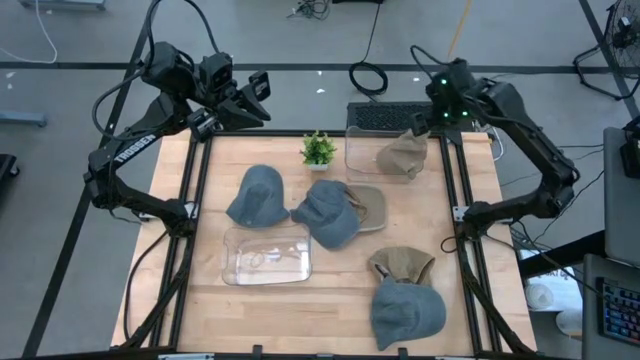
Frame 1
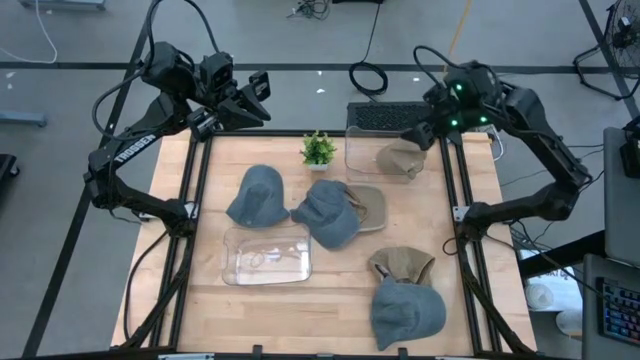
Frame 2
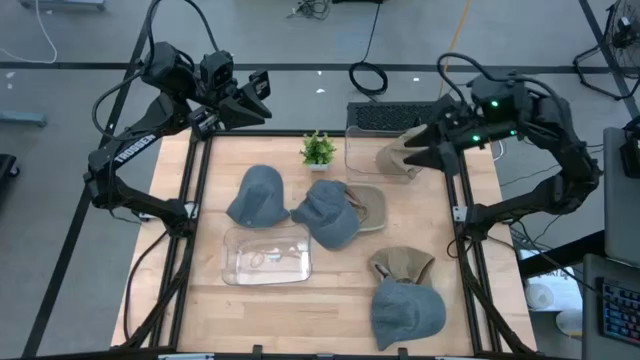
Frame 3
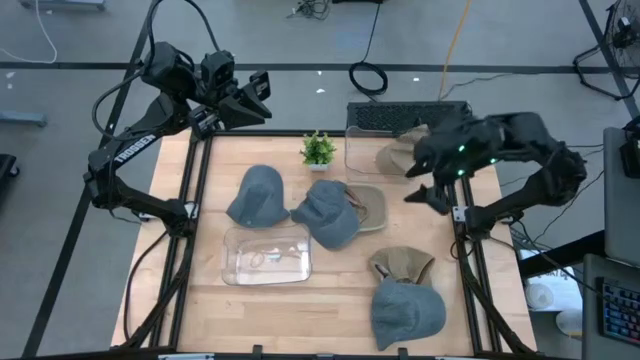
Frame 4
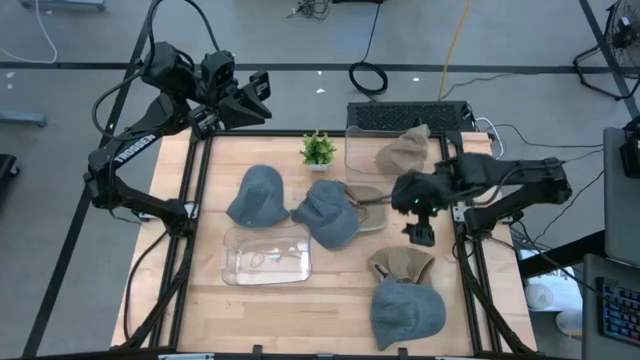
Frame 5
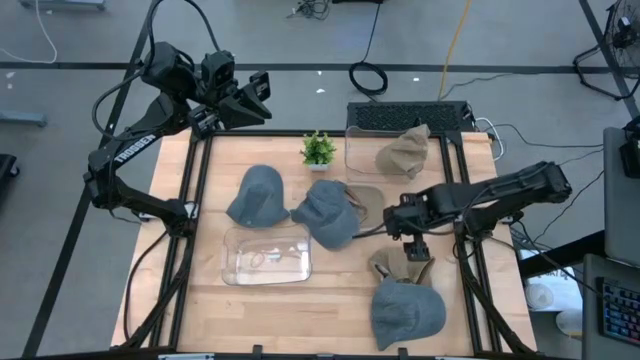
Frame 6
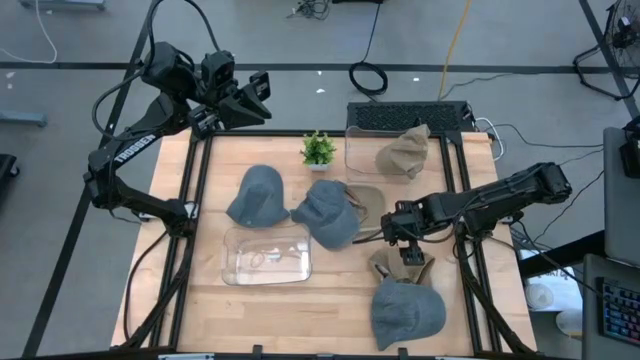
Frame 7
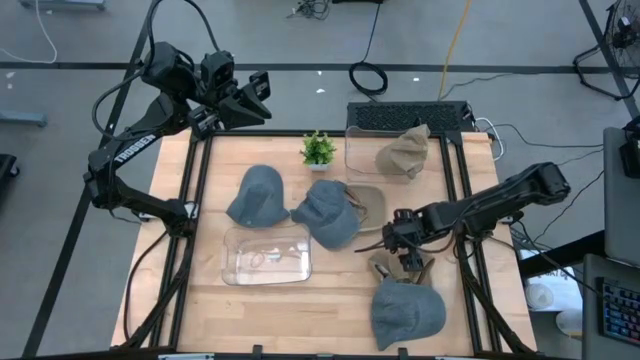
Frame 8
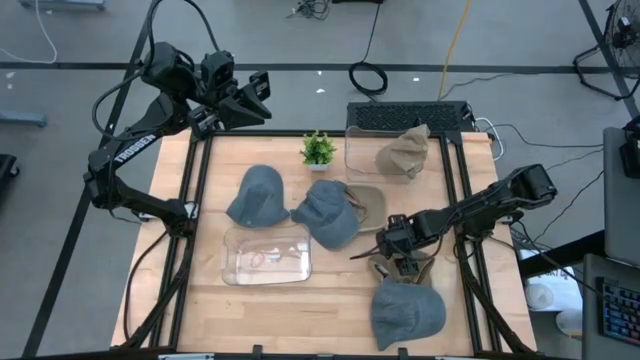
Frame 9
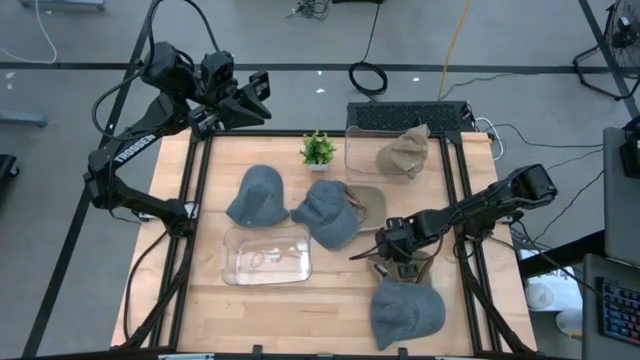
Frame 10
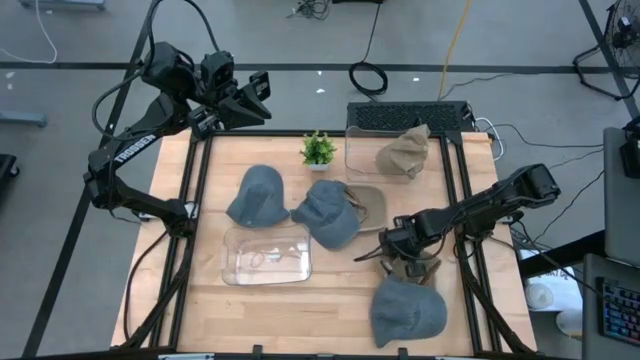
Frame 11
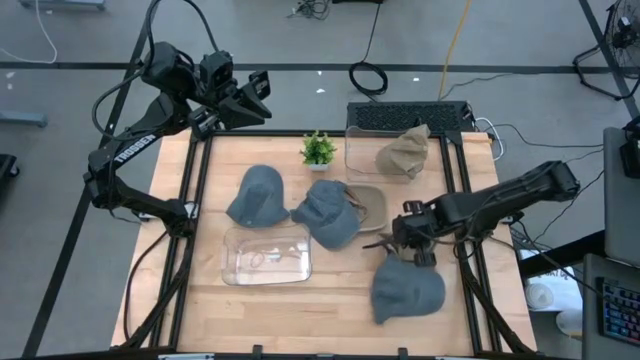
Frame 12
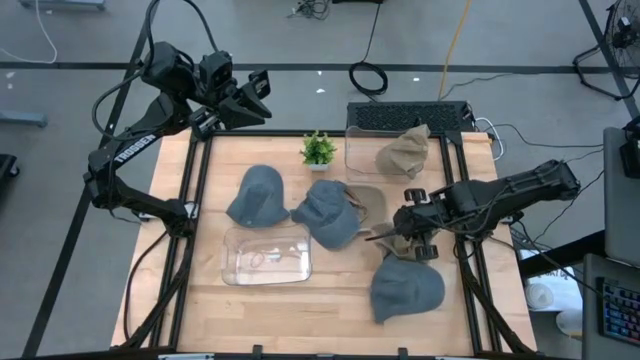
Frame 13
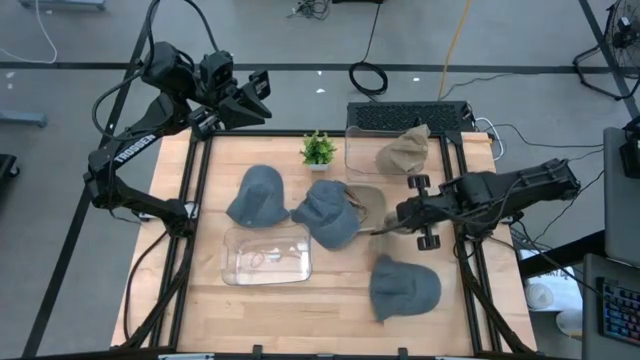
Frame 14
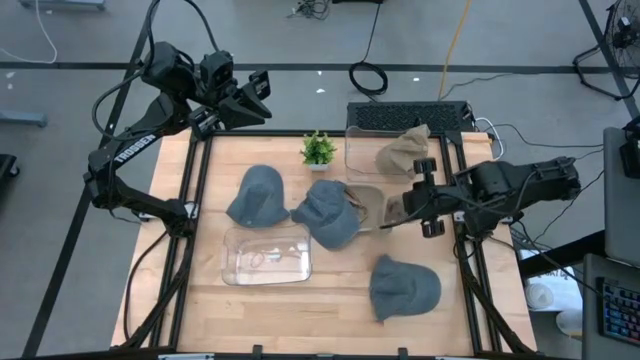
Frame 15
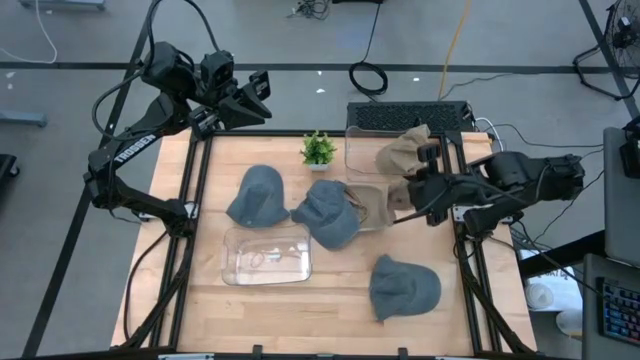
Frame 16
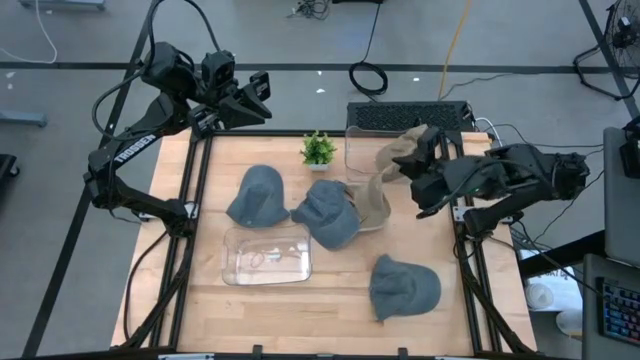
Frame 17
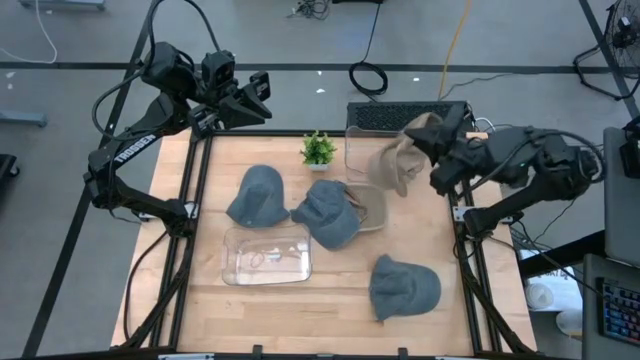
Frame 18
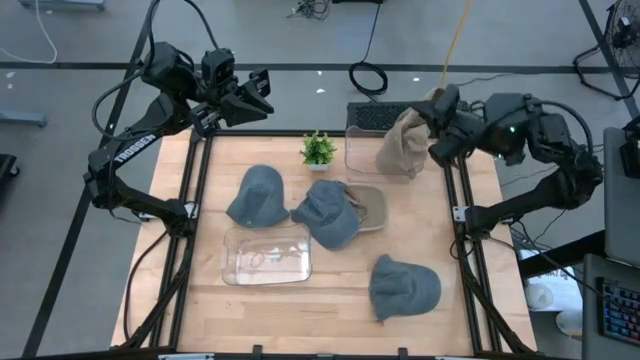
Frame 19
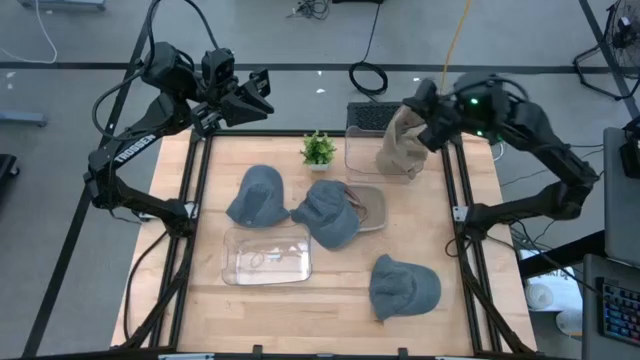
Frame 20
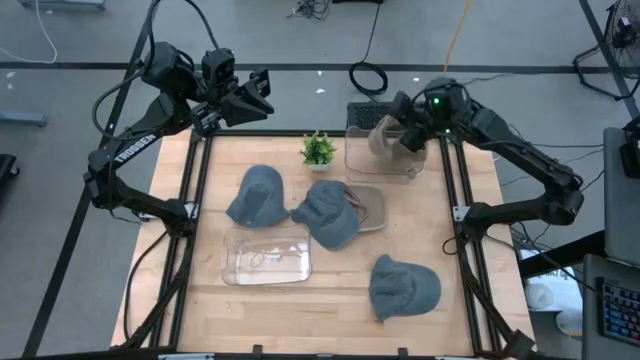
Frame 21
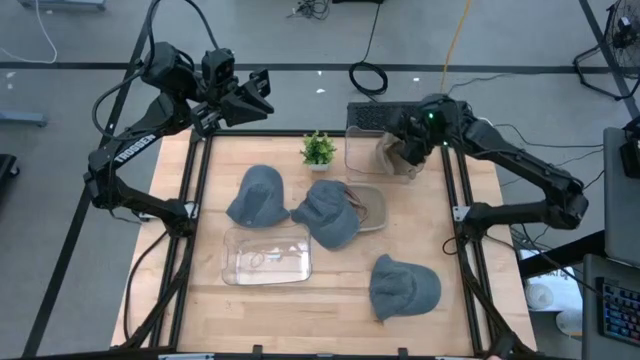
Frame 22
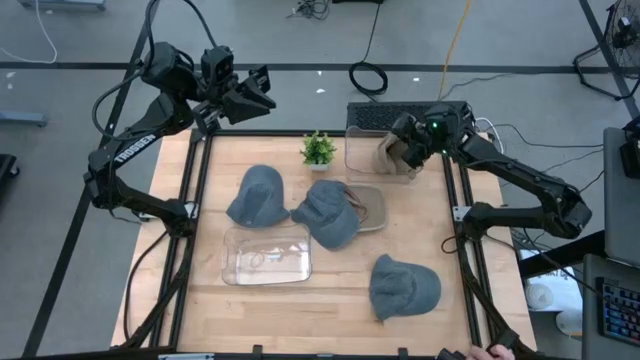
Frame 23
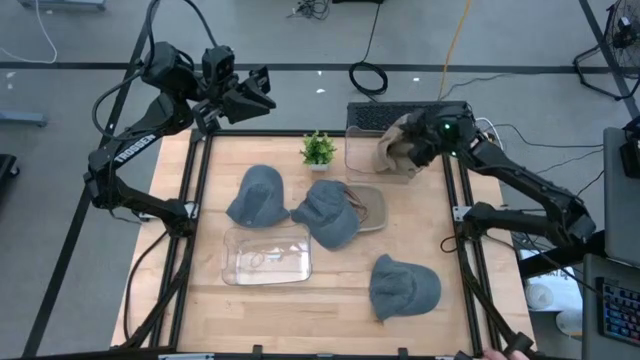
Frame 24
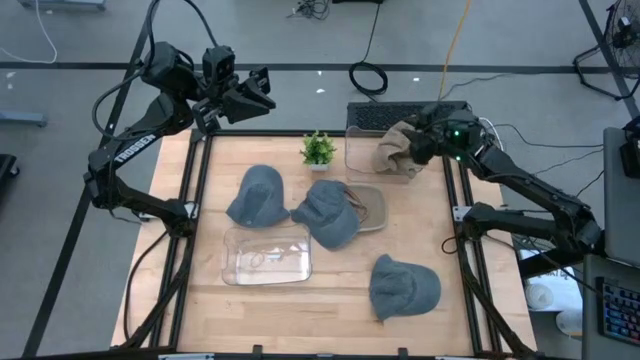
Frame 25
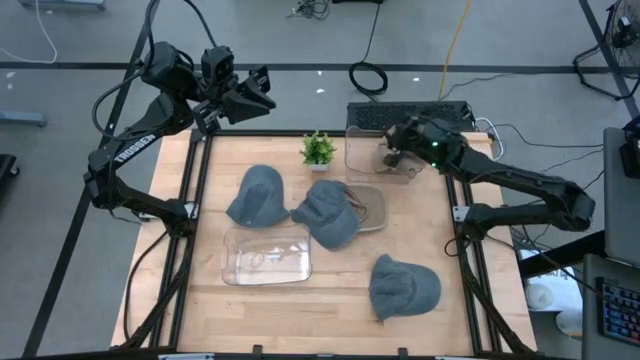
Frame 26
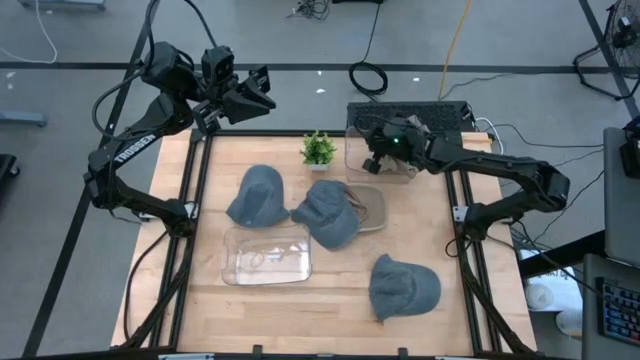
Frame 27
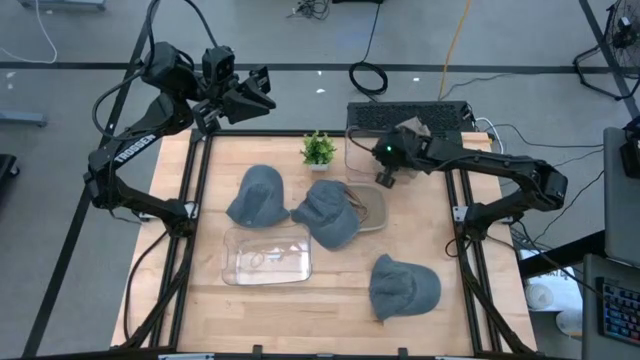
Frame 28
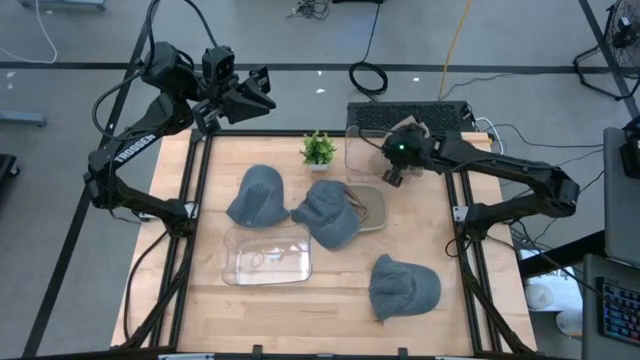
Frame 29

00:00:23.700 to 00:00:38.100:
Task: Pick & Place hat
Put the bottom brown cap into the top transparent bin

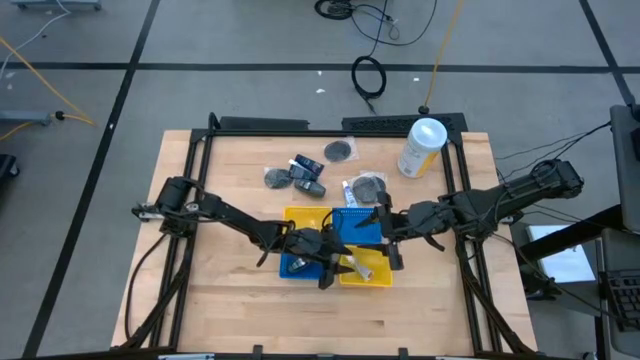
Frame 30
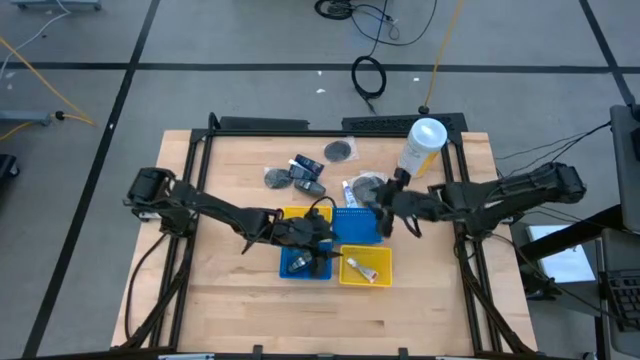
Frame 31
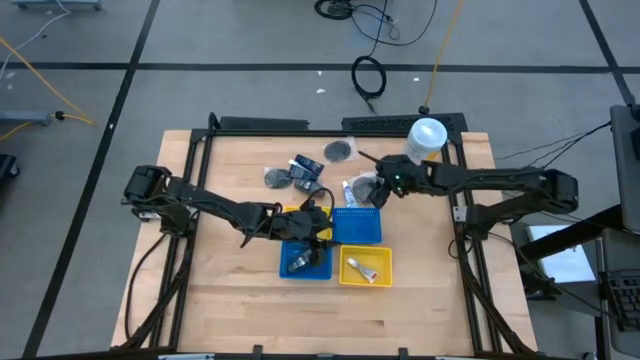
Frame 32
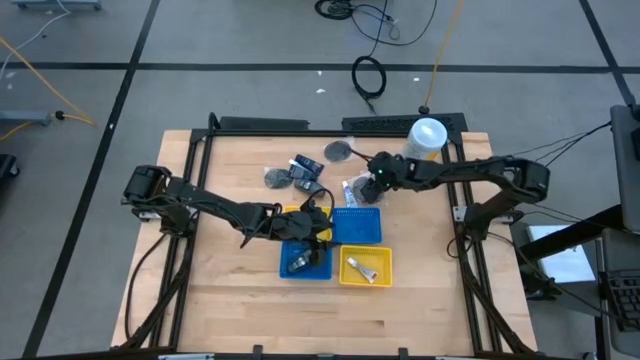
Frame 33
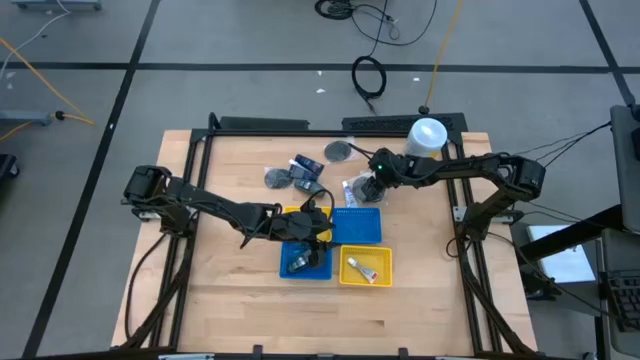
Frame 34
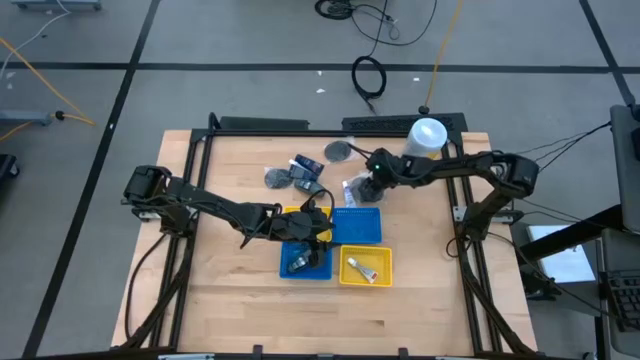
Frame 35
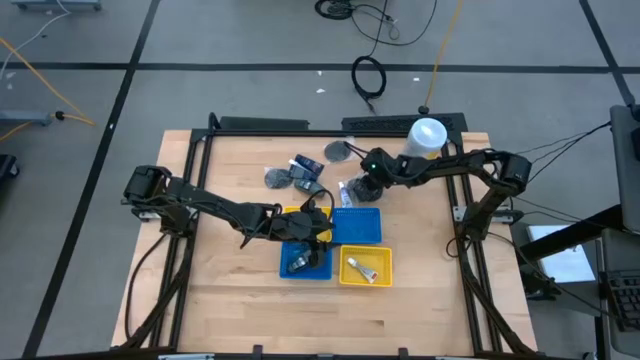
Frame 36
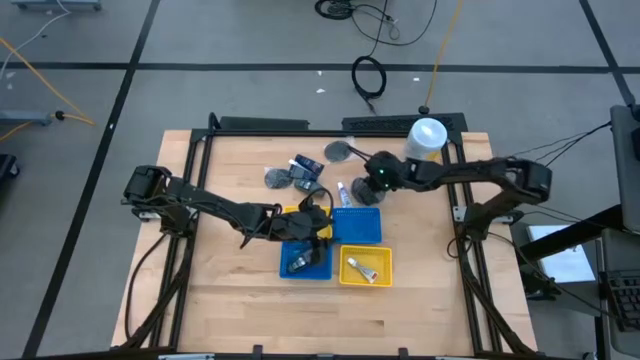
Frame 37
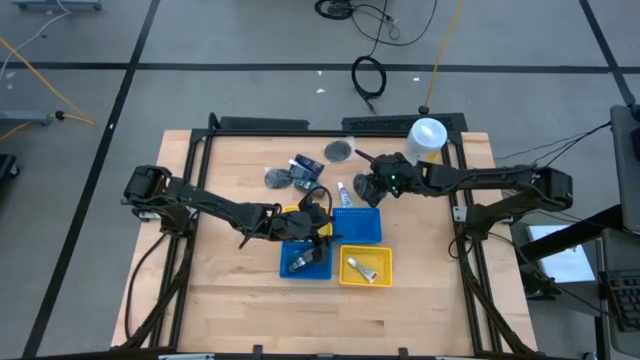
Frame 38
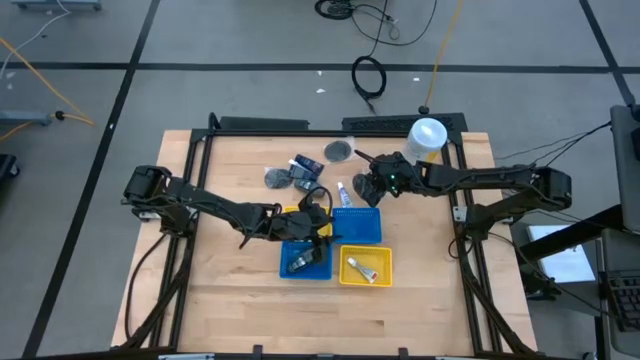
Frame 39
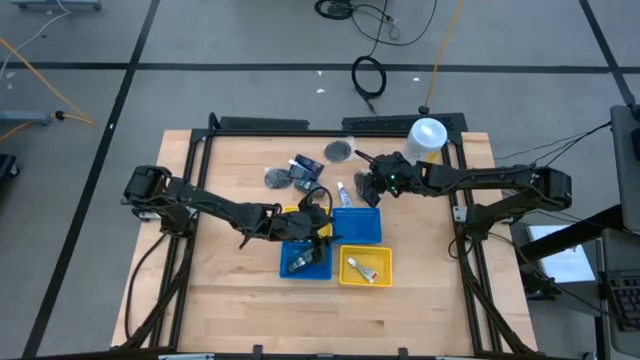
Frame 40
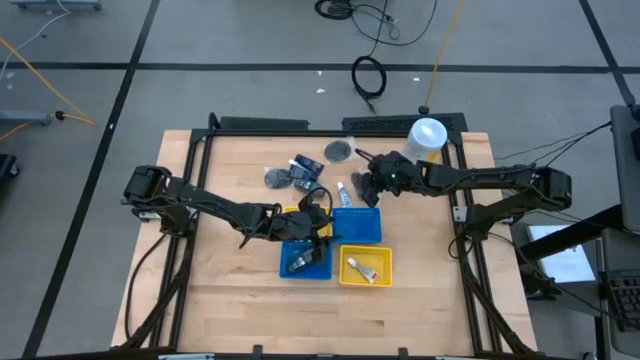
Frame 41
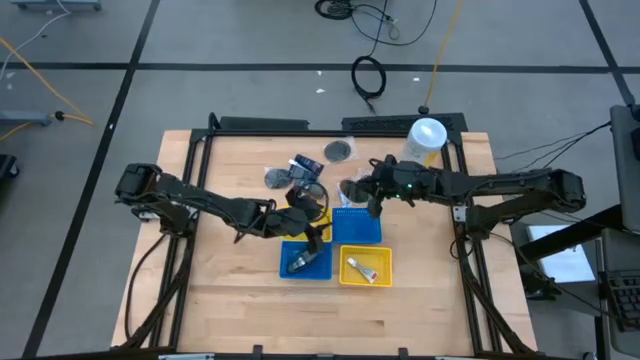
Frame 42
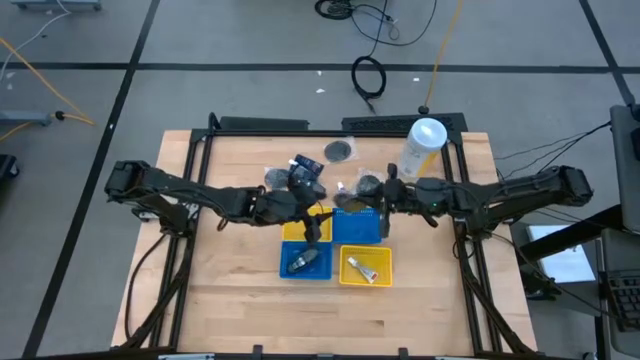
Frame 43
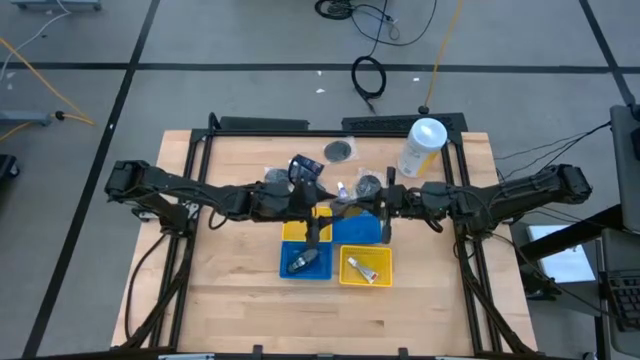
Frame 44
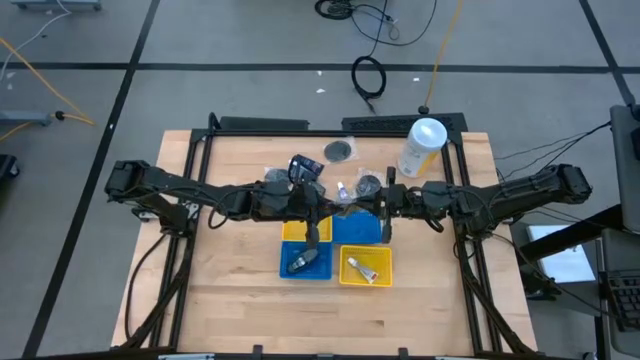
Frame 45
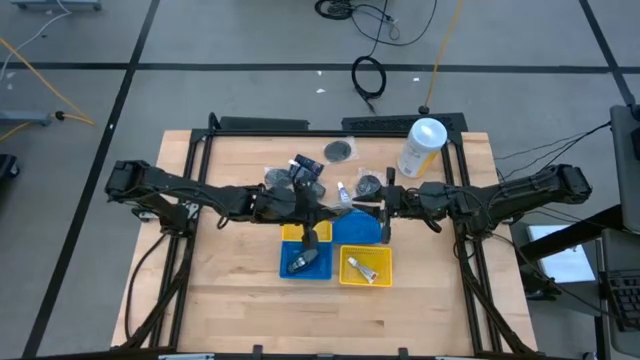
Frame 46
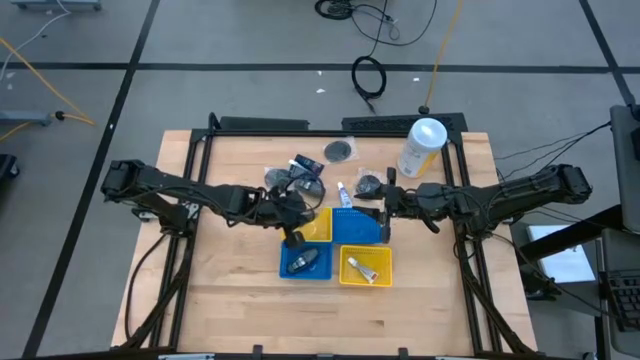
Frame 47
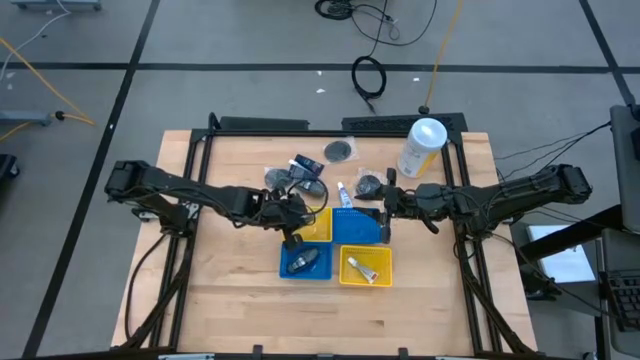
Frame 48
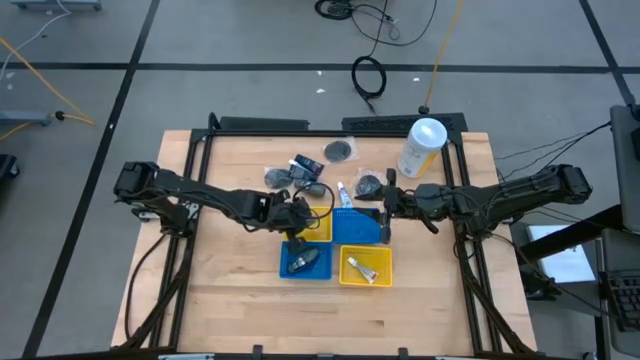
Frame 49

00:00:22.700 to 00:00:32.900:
Task: Pick & Place Travel size toiletries
Put the black hairbrush into the top yellow basket
